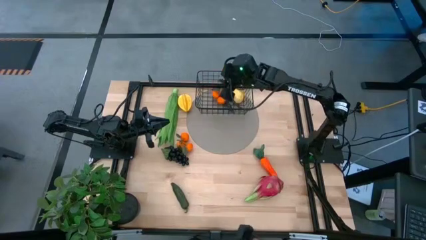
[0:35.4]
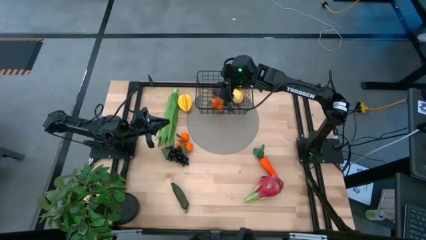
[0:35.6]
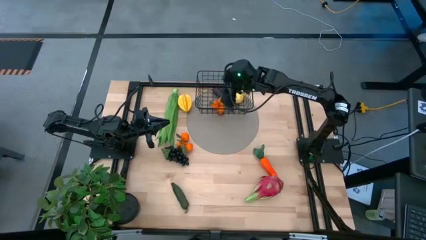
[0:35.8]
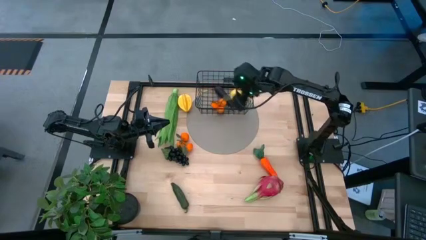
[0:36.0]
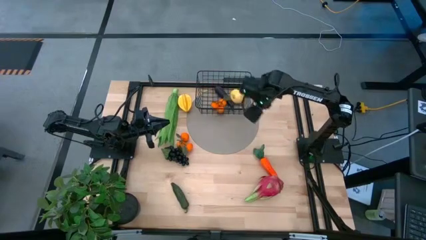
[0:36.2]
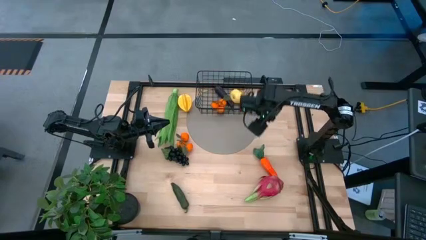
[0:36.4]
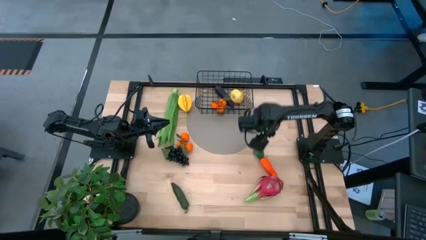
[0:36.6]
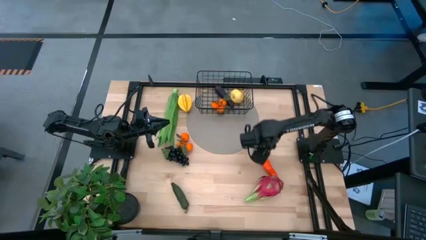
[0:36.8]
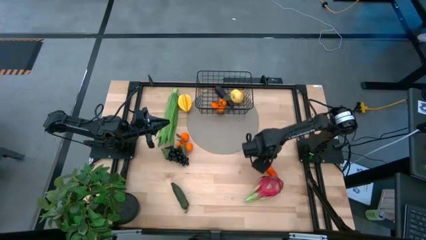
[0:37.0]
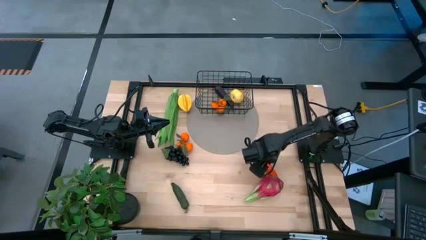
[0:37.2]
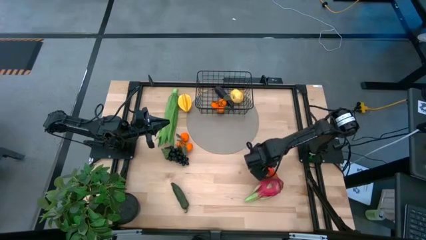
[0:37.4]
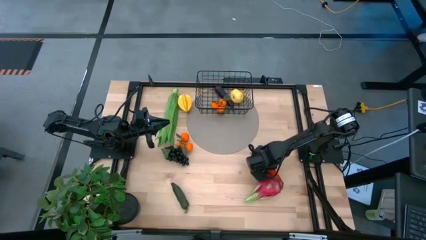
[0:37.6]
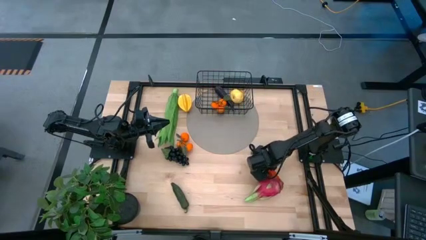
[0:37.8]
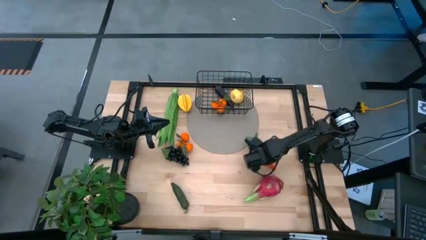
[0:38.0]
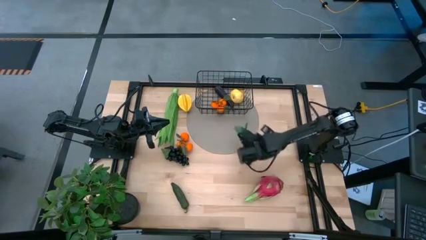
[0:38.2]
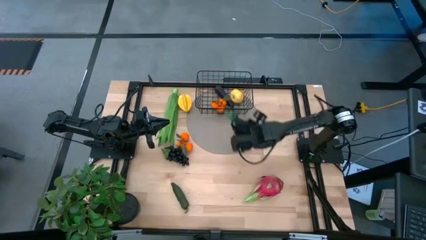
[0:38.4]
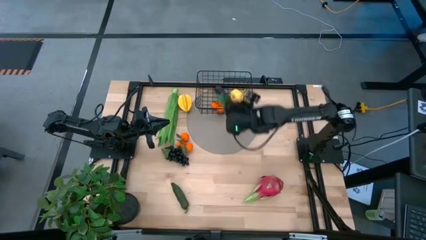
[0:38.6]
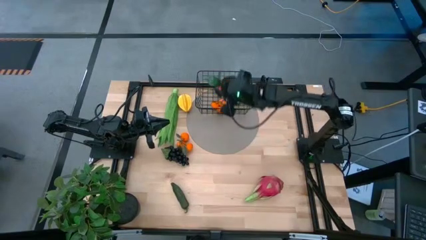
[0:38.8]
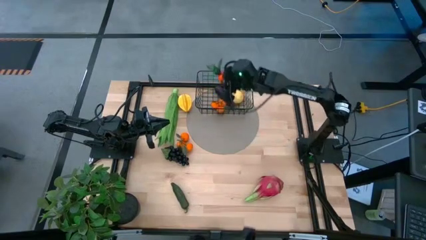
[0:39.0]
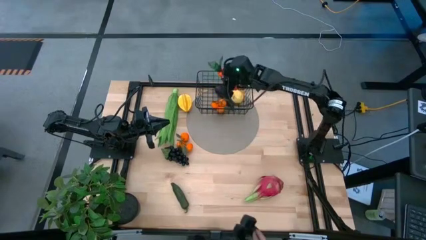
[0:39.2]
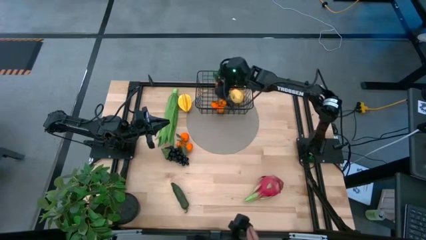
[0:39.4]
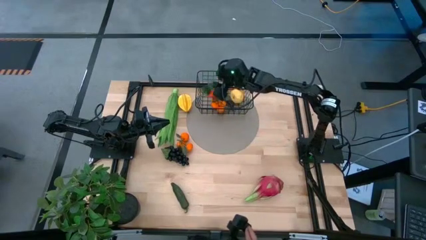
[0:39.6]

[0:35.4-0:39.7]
Task: Build produce basket
Put the orange carrot into the black wire basket

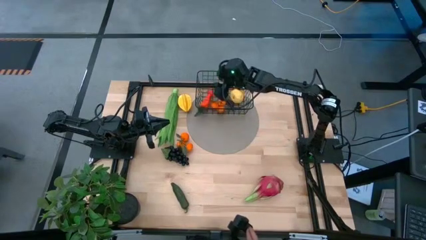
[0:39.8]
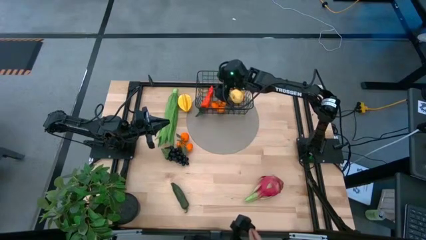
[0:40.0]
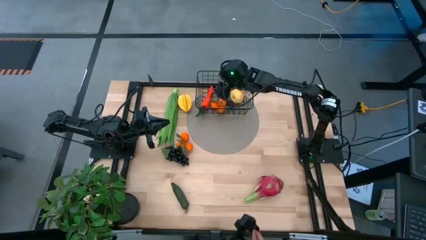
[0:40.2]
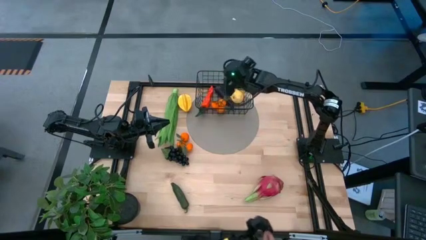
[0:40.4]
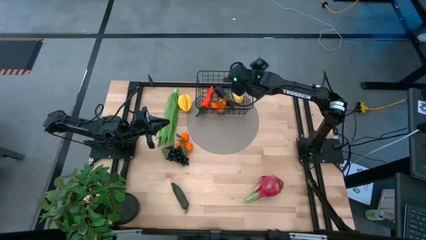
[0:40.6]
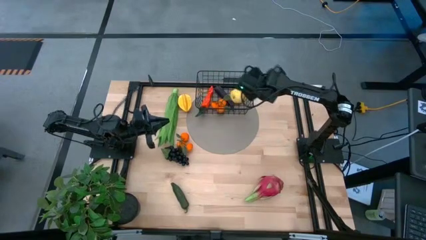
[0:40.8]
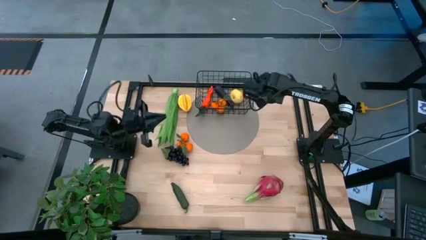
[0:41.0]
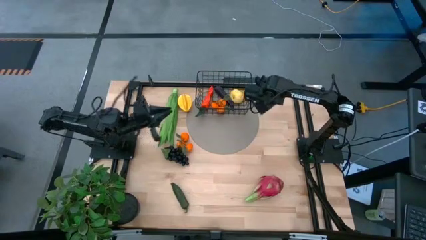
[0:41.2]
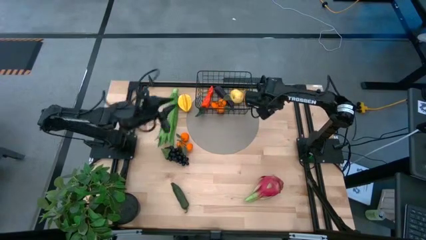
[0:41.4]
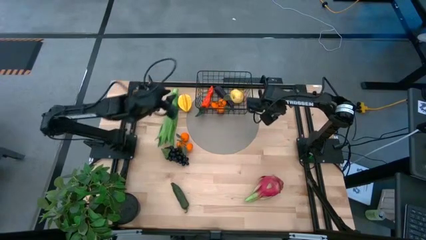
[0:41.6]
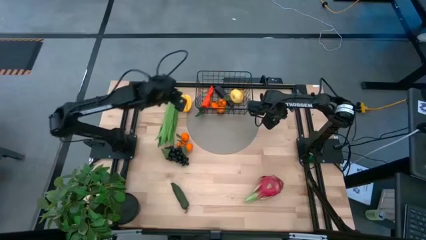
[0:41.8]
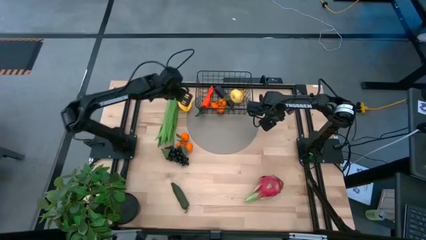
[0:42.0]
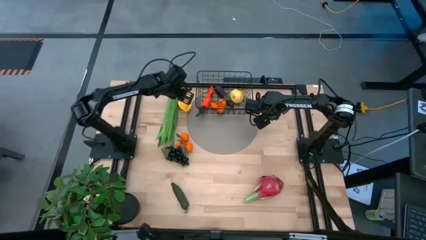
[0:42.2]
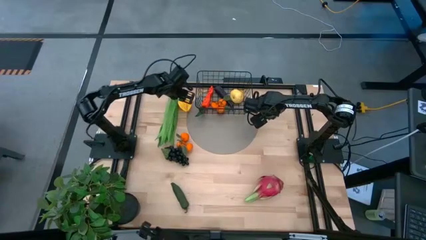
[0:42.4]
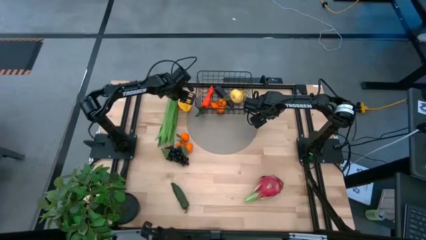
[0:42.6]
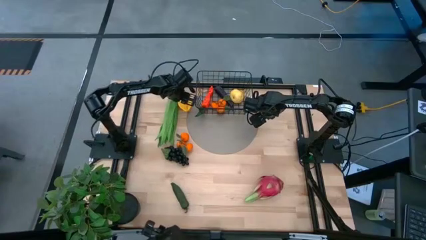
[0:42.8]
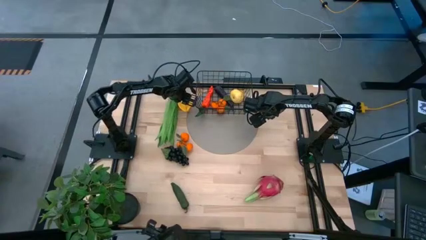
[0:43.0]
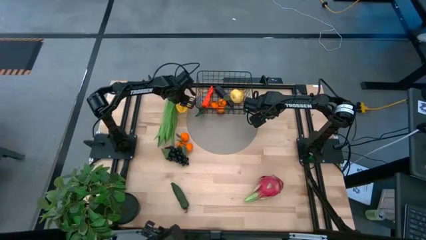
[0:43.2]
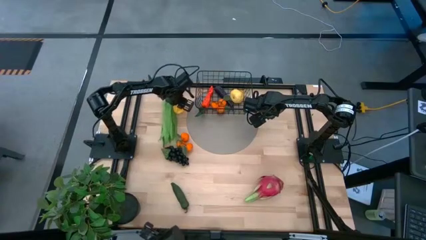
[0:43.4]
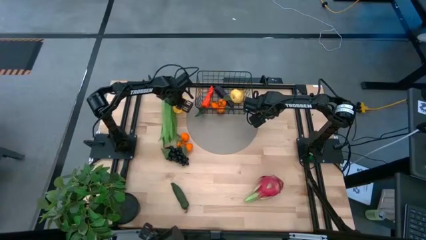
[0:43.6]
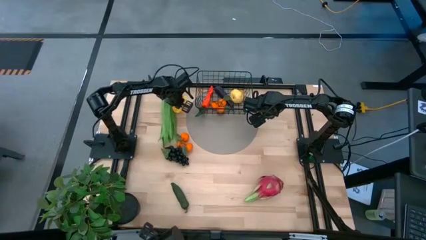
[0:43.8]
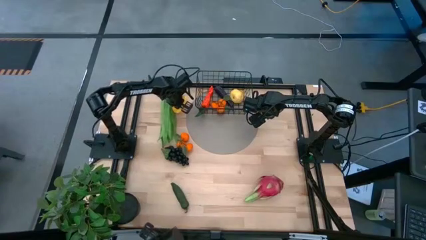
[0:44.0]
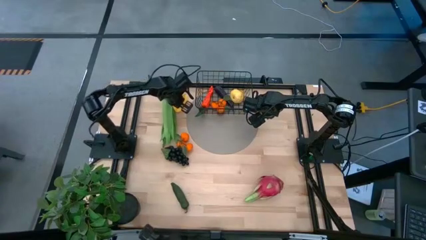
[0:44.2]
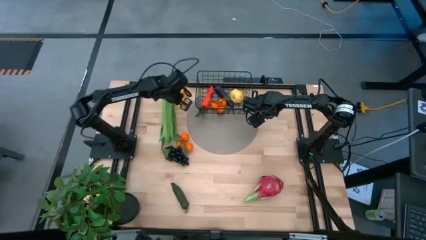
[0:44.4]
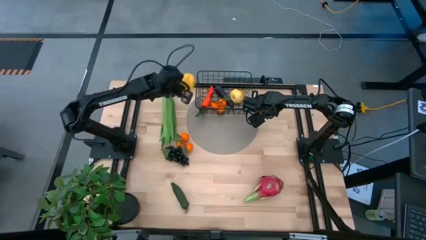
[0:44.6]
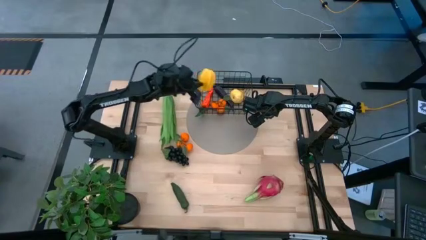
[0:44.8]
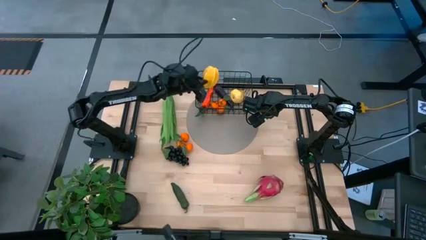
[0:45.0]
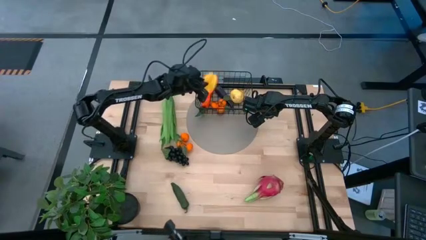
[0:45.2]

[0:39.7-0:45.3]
Put the yellow starfruit into the black wire basket

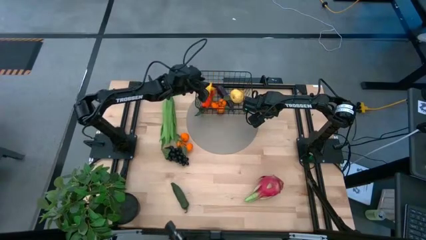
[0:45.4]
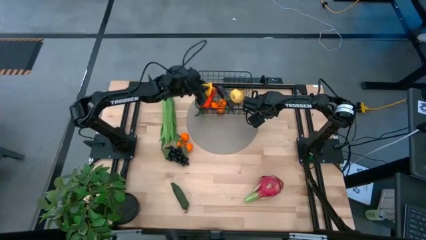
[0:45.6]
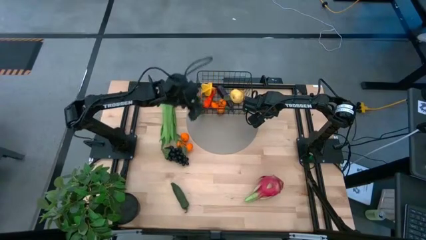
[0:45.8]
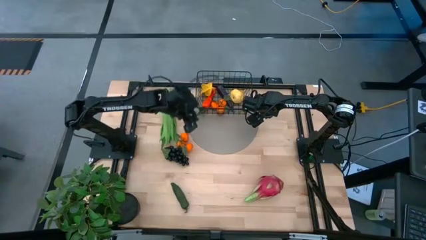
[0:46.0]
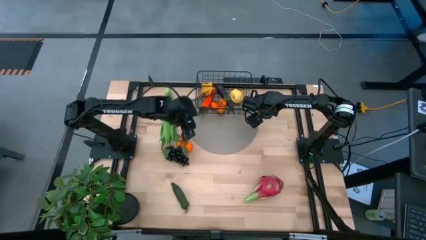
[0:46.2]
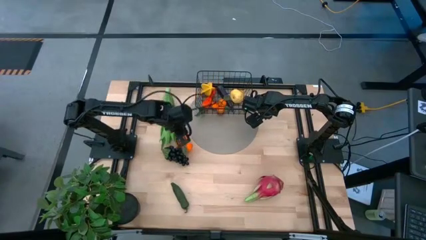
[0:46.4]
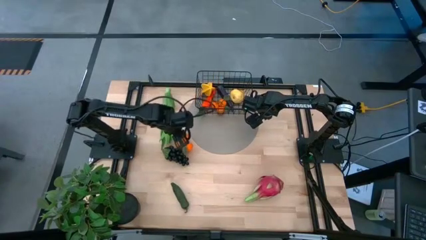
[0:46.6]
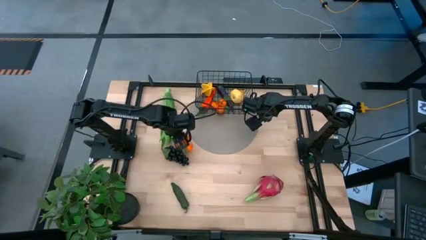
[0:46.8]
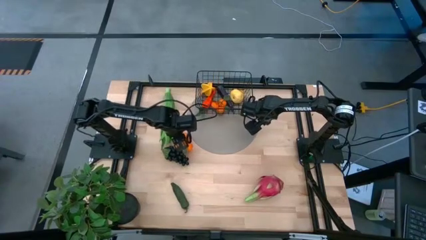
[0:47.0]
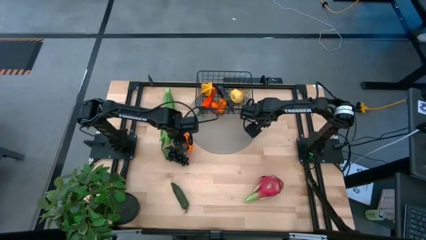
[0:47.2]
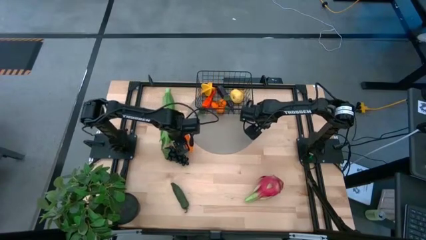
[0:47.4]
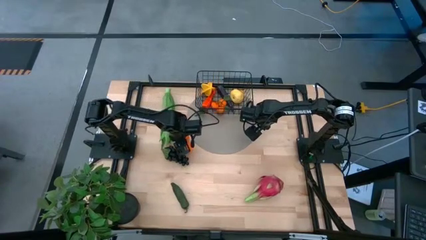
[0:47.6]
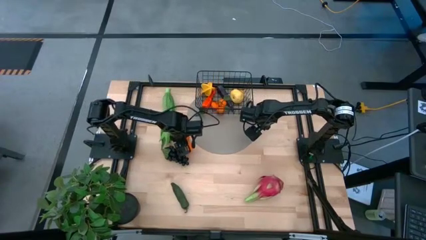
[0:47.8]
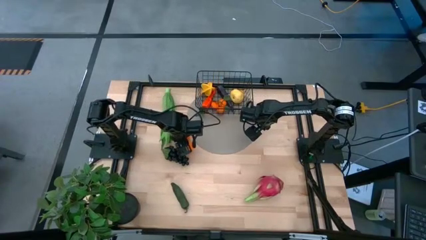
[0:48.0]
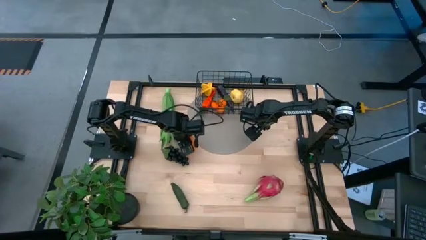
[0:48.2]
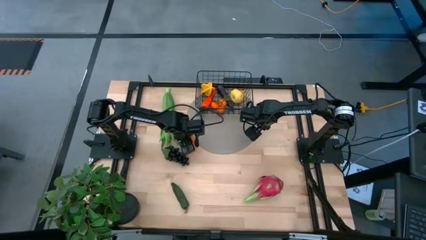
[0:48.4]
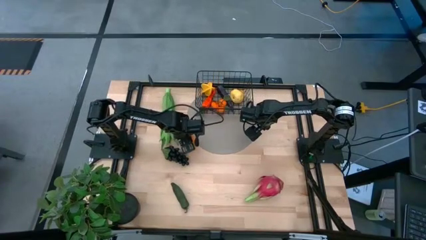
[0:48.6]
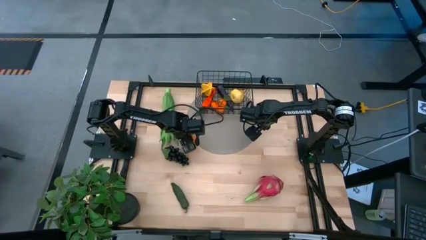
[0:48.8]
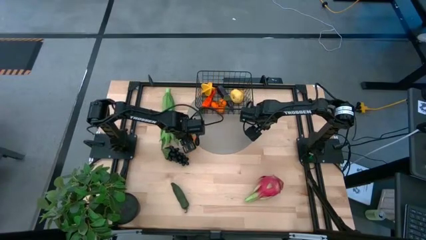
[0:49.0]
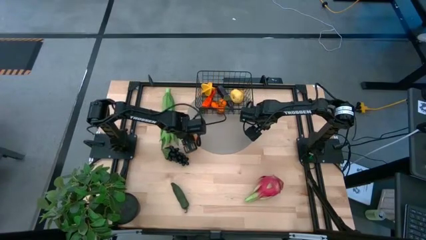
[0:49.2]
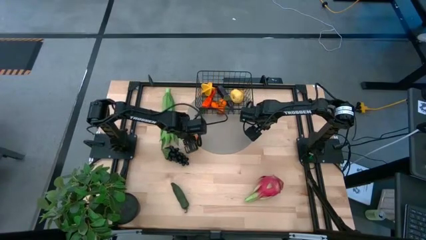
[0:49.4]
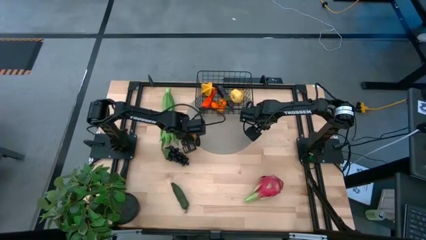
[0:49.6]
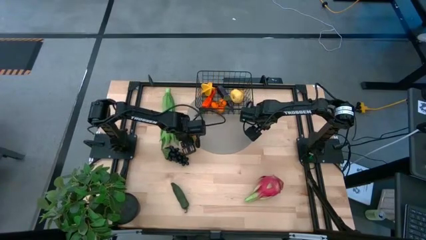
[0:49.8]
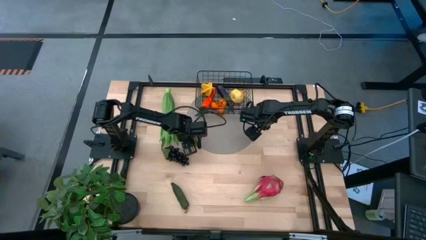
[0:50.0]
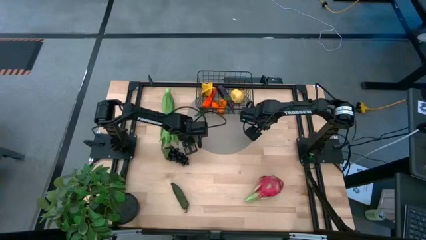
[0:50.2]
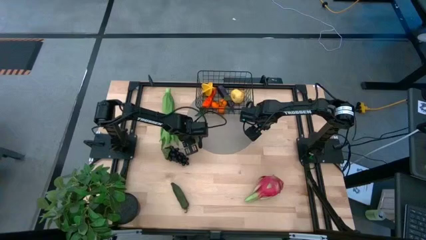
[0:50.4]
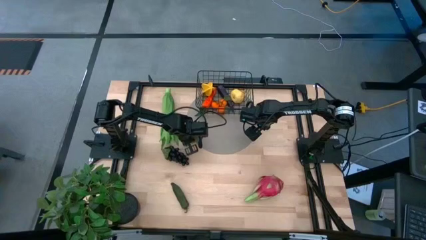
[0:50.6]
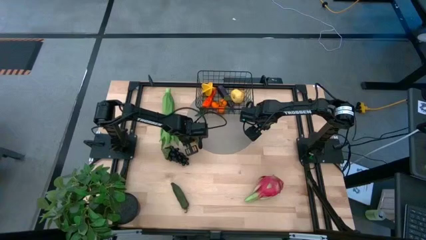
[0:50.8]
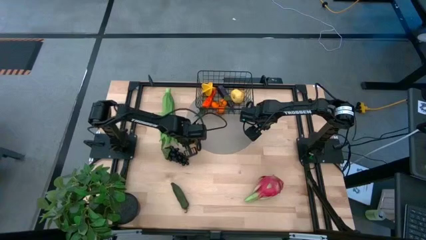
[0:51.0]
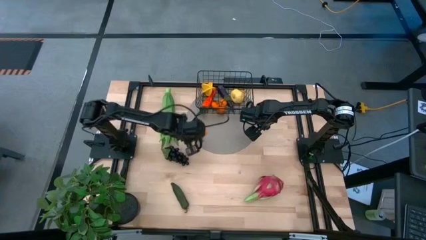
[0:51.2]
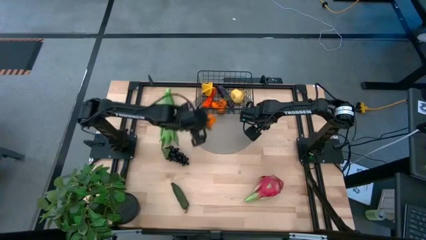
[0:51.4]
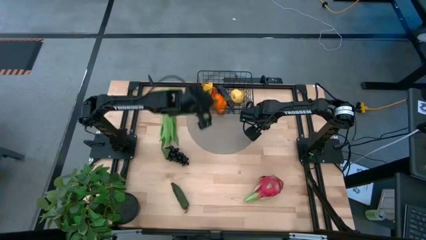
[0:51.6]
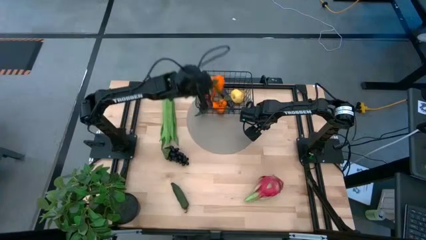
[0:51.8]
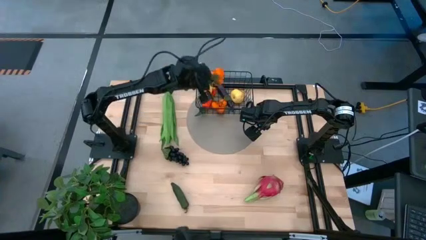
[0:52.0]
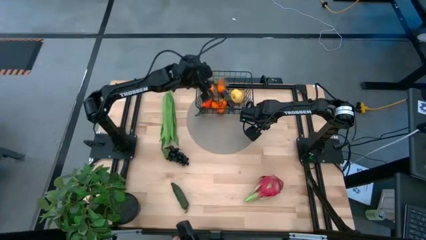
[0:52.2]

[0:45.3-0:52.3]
Put the orange tangerines into the black wire basket
